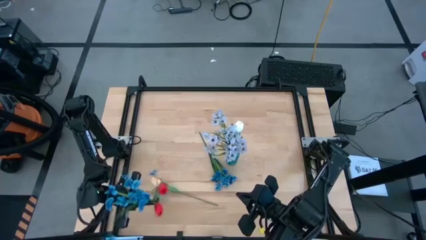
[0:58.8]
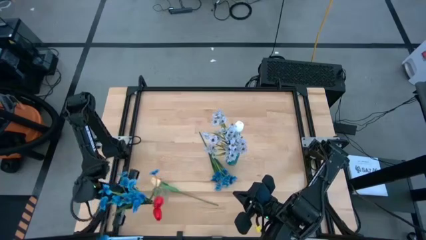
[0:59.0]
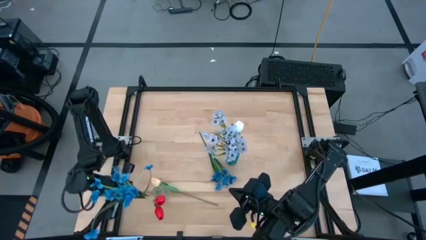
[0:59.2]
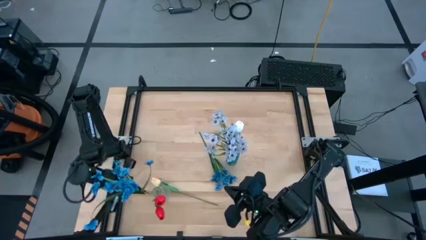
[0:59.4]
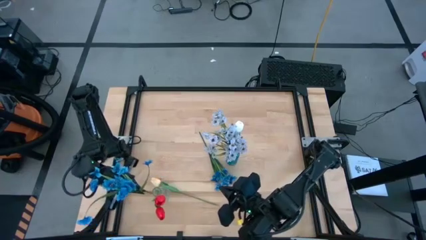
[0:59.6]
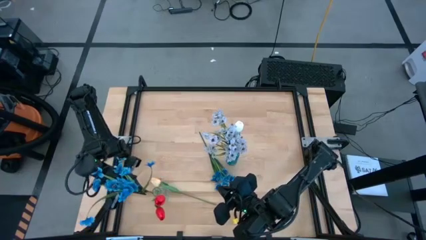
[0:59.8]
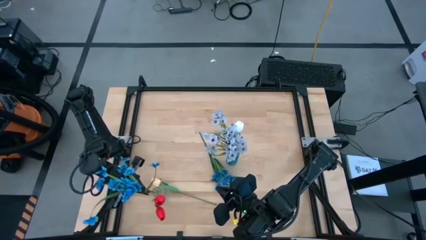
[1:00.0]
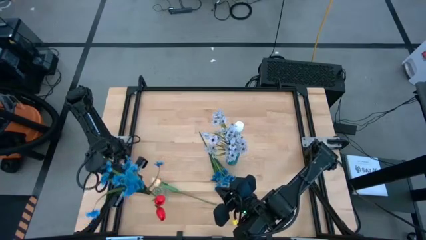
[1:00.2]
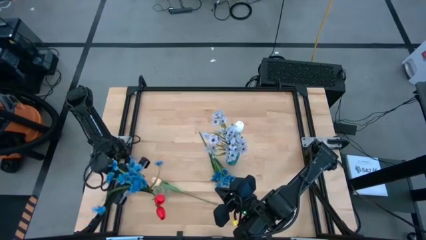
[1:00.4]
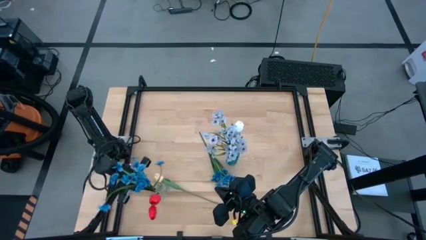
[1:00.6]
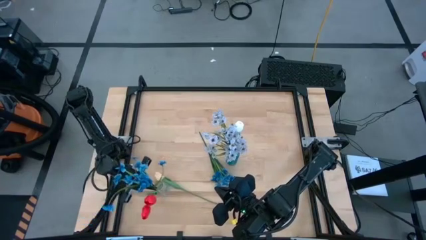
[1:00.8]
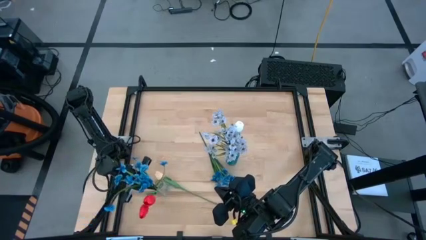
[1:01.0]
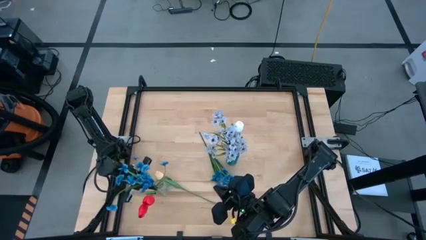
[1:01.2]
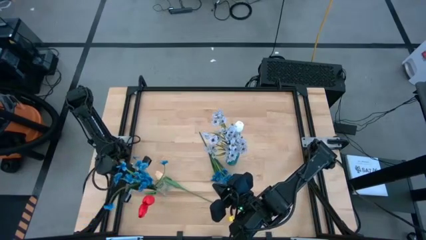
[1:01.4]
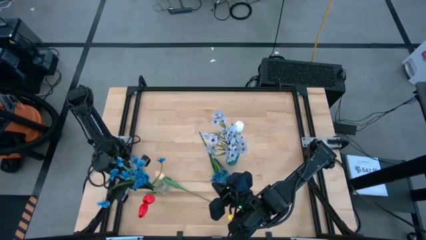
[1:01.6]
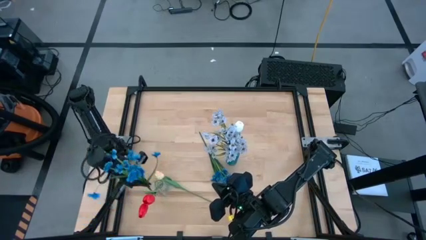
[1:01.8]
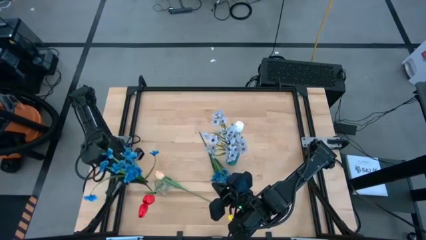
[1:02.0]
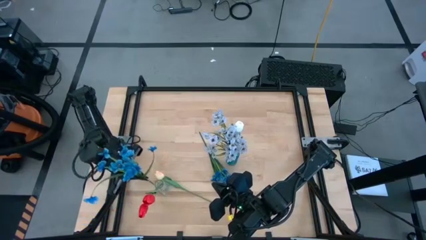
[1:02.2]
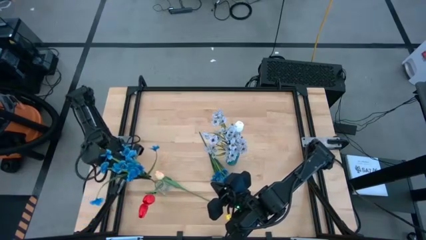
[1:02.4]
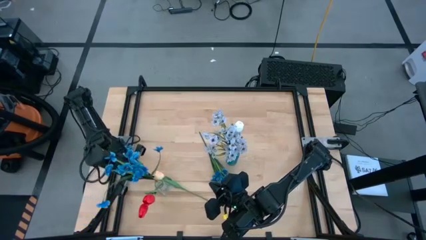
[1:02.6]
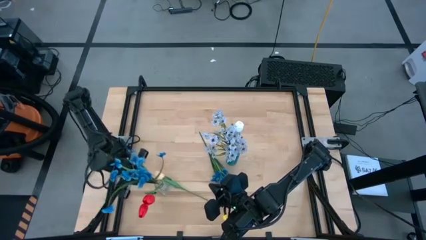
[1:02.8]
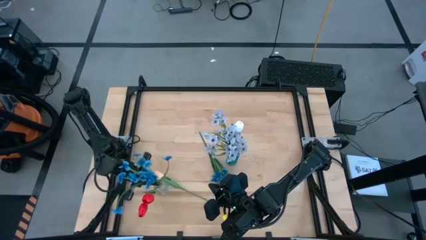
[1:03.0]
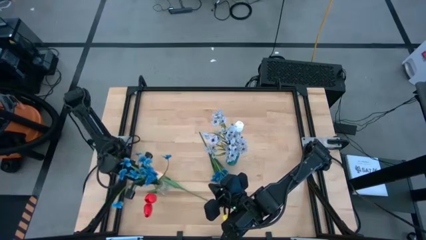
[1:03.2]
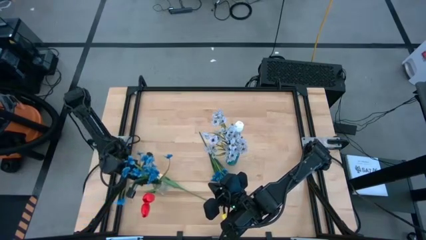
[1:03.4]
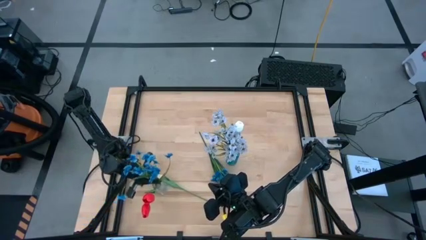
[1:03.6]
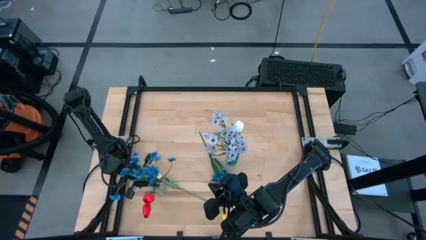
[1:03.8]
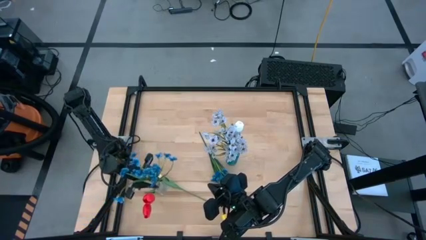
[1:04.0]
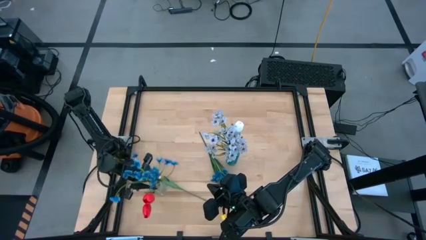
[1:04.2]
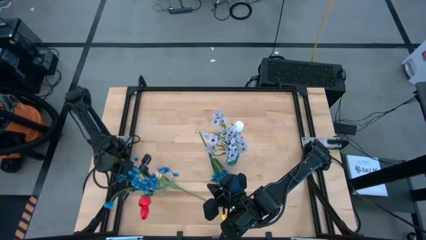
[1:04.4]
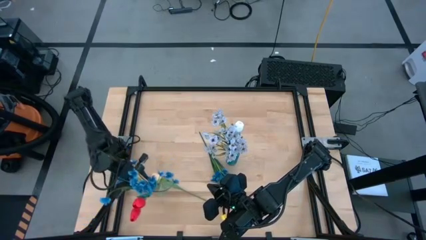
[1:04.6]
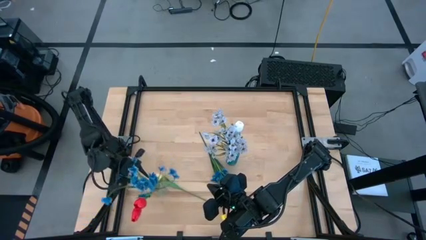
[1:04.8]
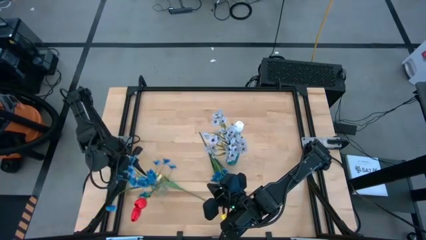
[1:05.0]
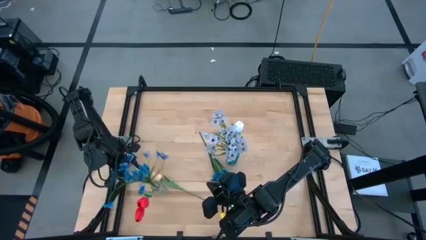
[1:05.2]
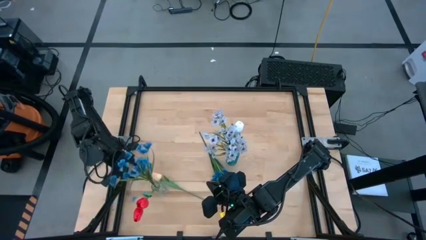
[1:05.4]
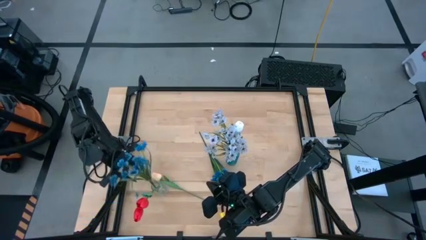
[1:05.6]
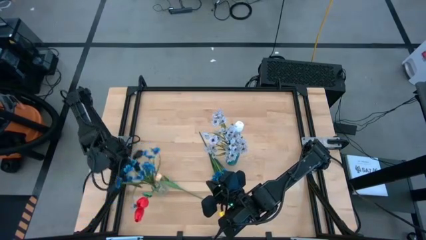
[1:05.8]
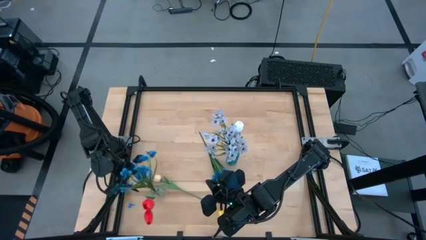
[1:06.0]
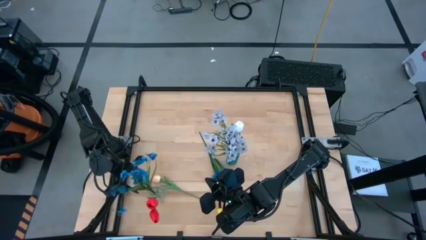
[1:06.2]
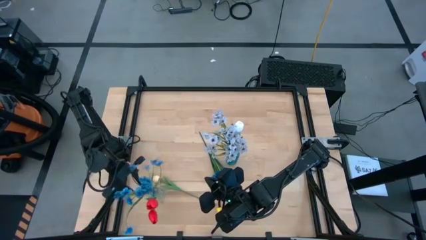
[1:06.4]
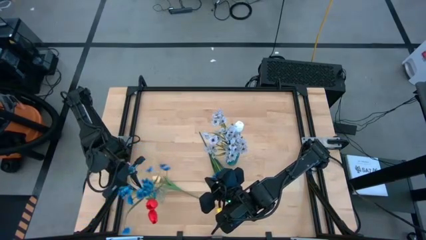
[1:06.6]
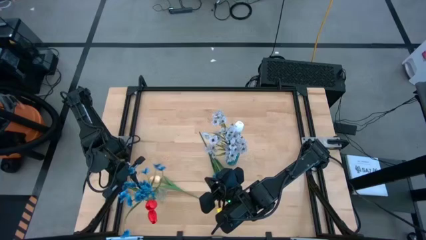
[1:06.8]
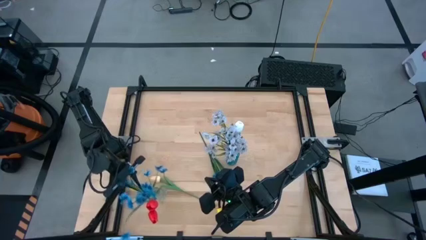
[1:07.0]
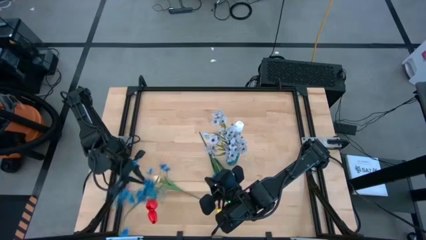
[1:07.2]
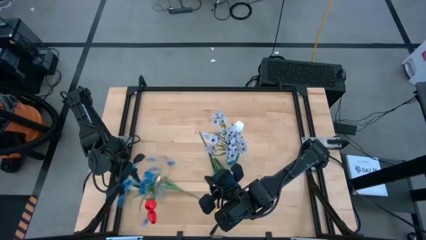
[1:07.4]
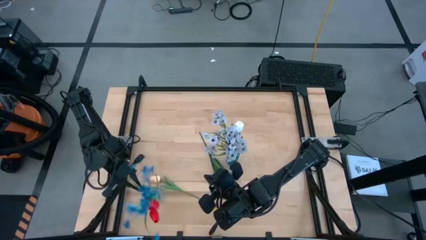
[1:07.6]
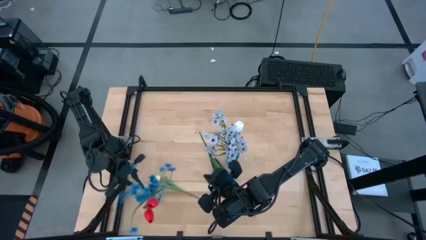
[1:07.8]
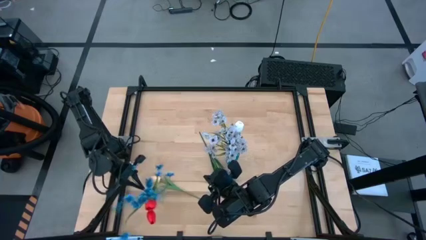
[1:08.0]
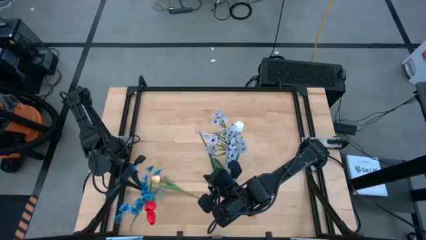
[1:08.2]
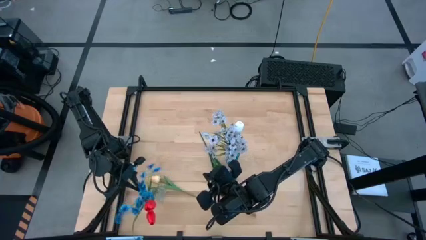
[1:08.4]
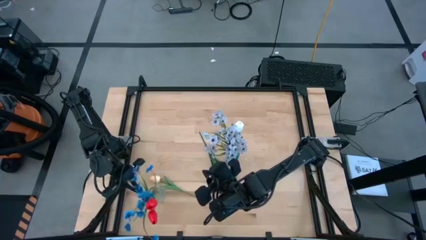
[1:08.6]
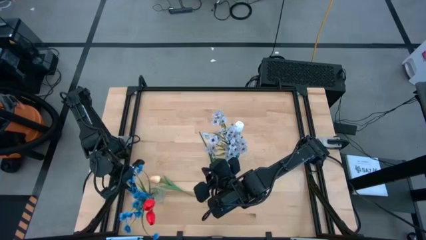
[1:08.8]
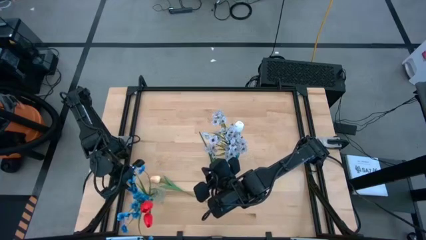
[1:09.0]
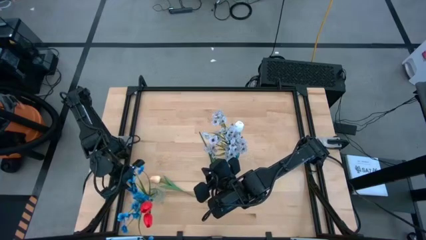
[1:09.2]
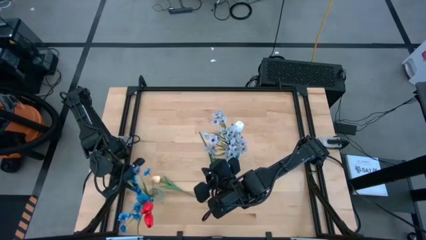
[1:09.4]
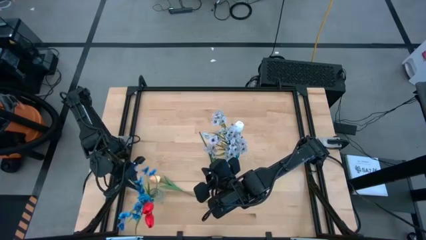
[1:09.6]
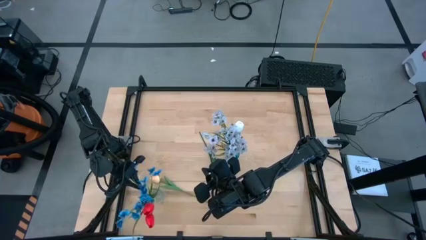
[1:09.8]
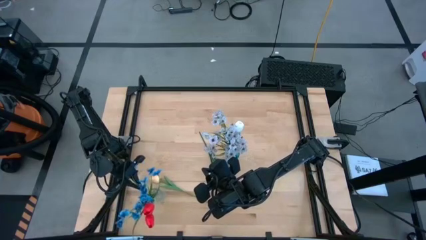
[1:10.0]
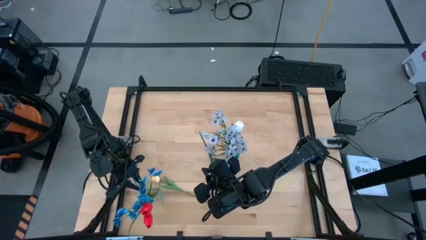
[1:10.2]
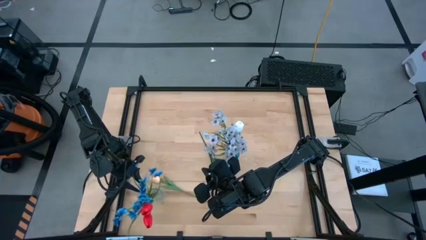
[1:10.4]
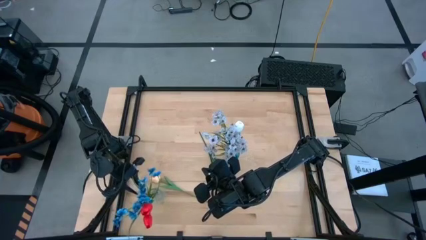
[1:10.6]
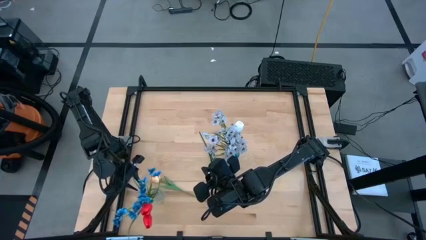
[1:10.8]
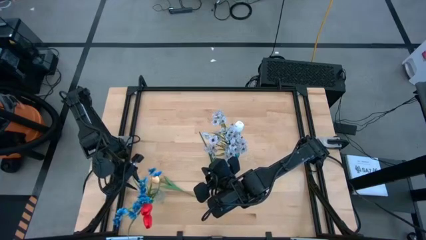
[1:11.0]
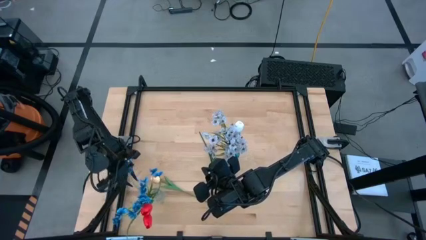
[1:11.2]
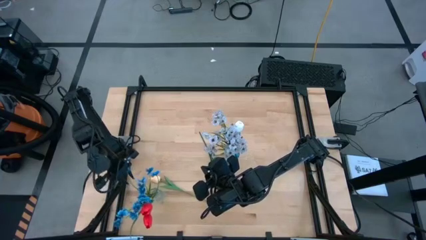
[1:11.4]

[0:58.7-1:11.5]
Task: Sort flowers into vase by color
Put the bottom blue flowers into the transparent flower vase

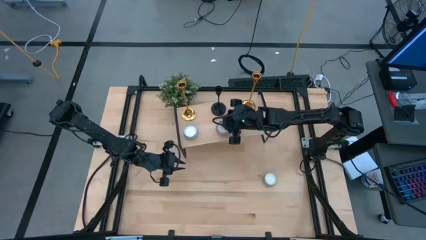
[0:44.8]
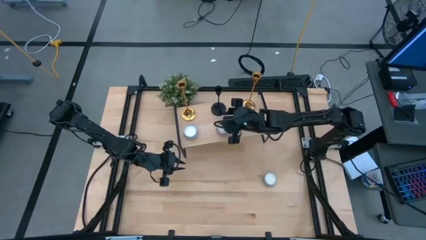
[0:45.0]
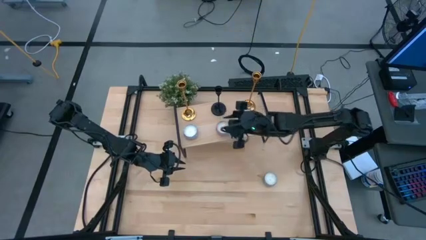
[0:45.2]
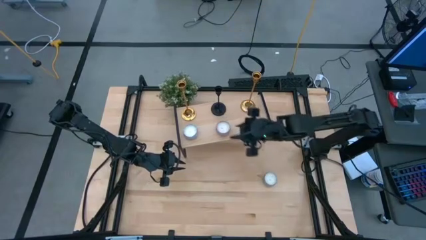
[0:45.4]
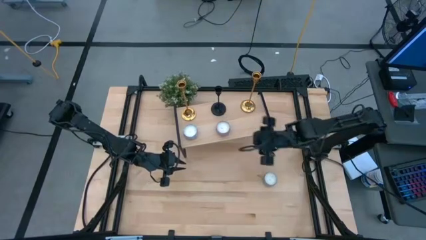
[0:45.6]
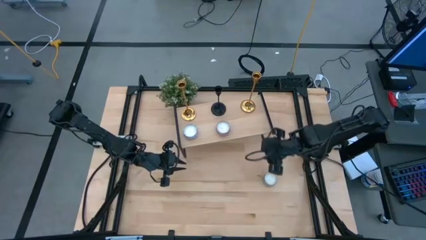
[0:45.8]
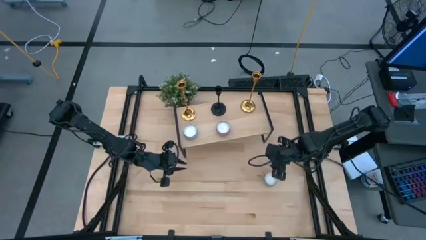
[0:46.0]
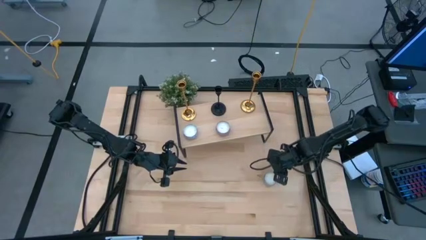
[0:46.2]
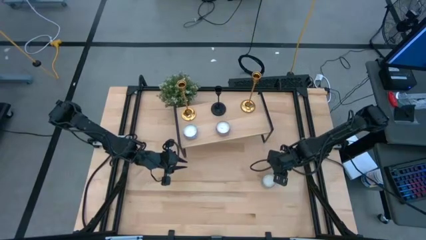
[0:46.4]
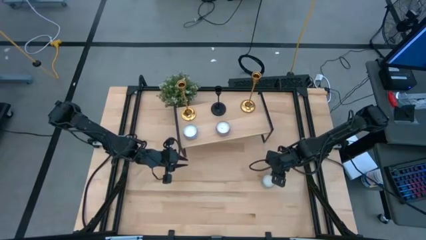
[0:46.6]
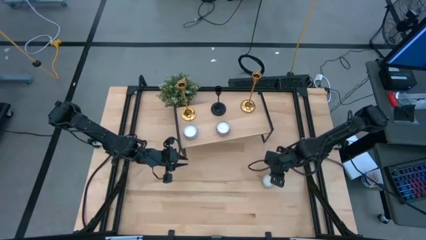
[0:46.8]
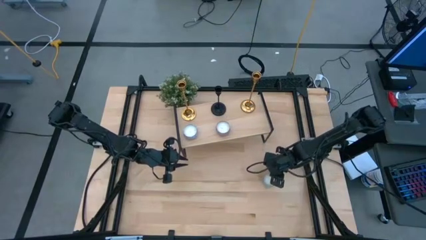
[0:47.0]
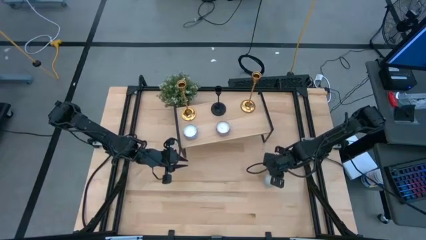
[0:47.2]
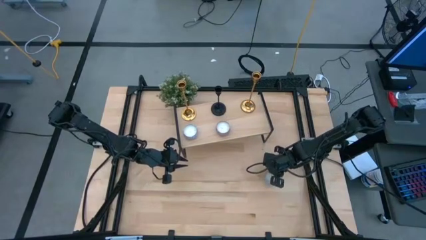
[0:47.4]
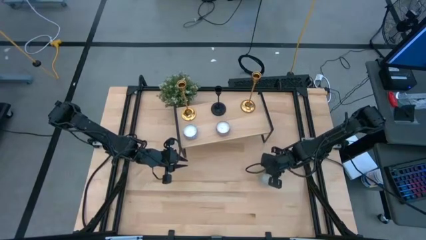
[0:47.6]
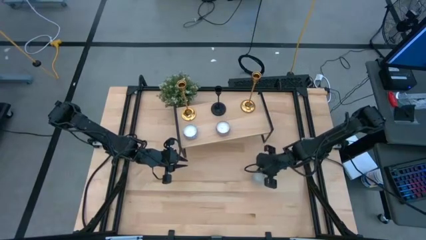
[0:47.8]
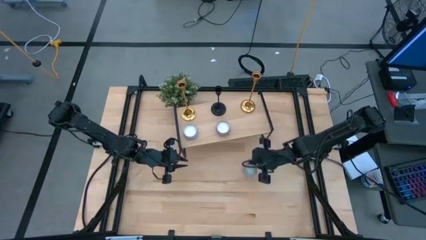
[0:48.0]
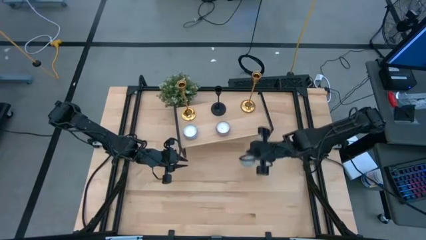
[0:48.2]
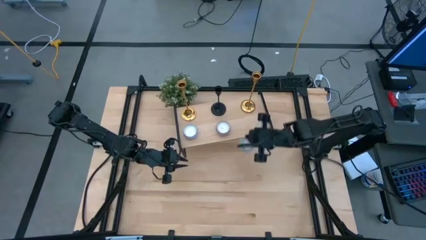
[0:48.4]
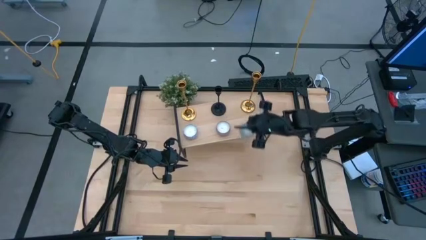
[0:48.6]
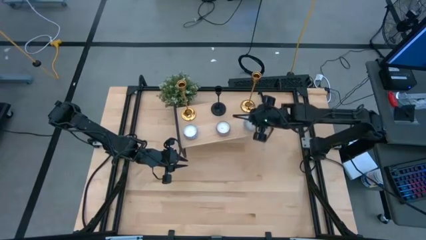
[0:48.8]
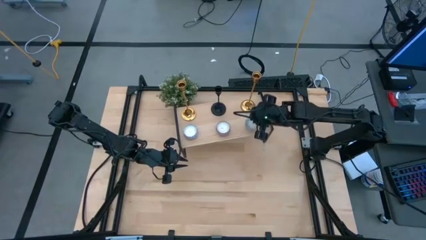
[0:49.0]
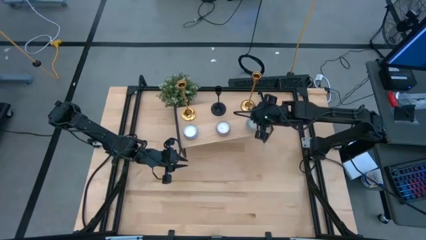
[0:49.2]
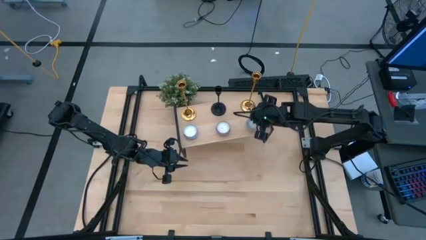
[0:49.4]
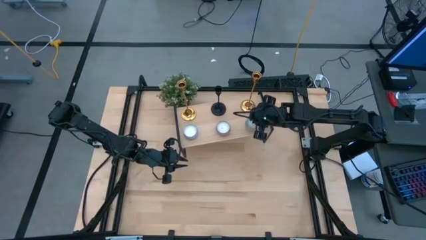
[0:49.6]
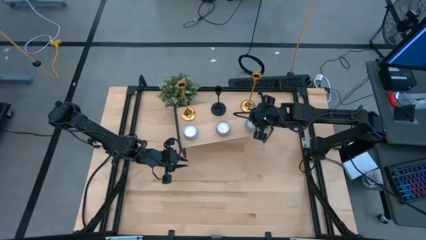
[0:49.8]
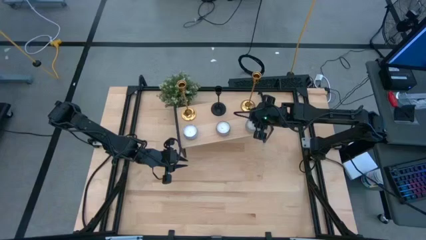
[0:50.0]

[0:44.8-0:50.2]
Task: Pick & Place candle stick holders
Put the blue scented candle on the shelf
